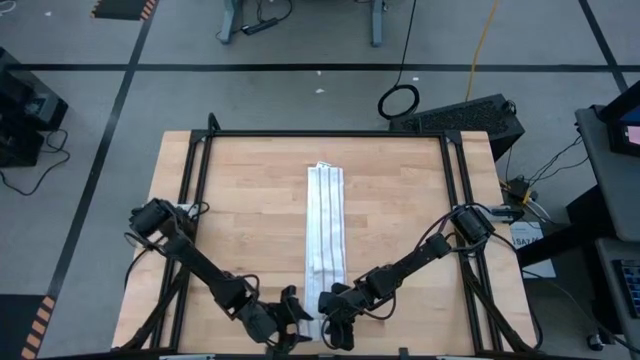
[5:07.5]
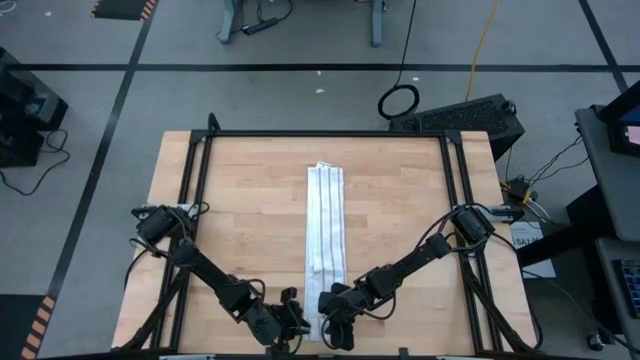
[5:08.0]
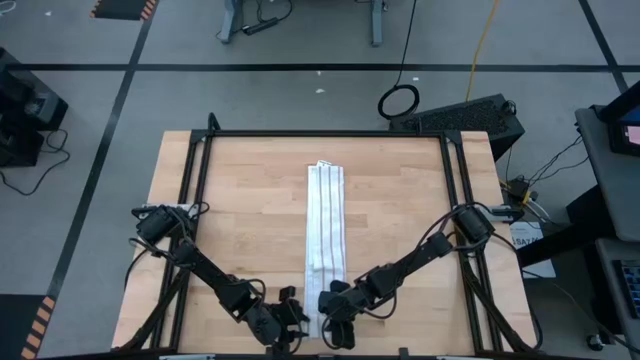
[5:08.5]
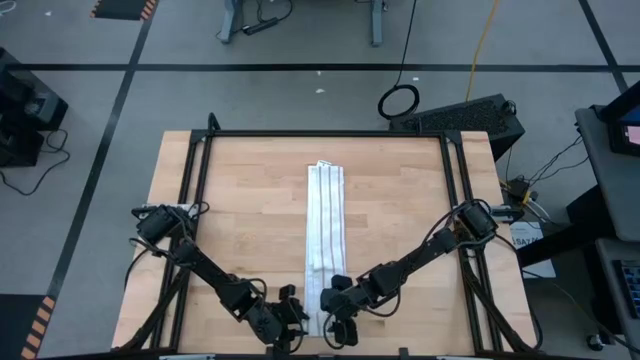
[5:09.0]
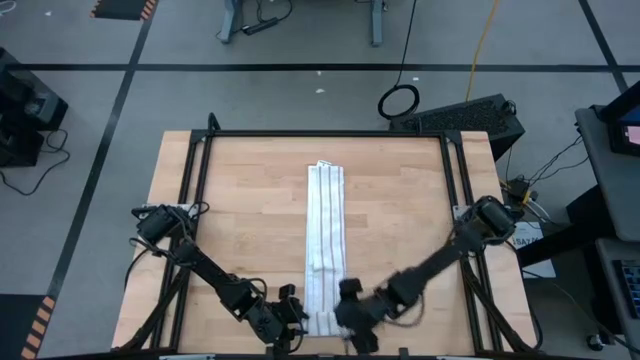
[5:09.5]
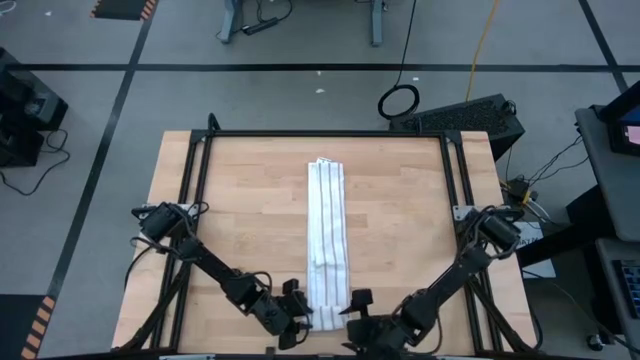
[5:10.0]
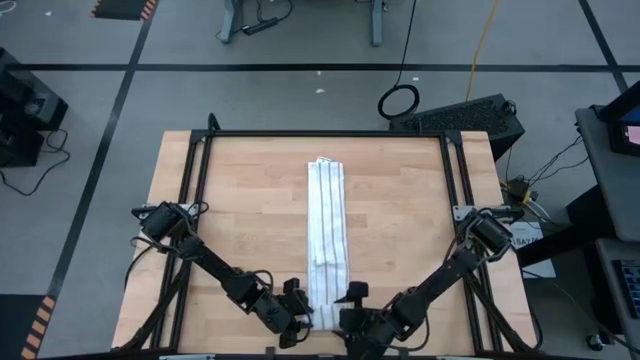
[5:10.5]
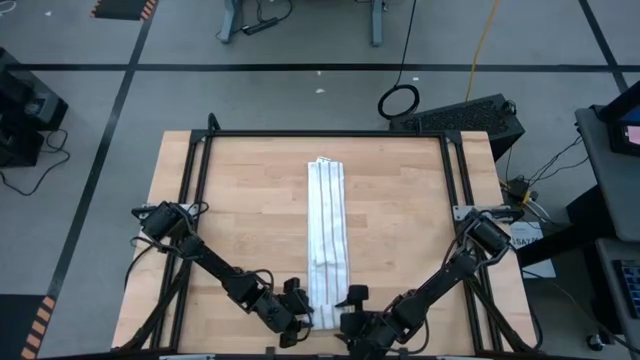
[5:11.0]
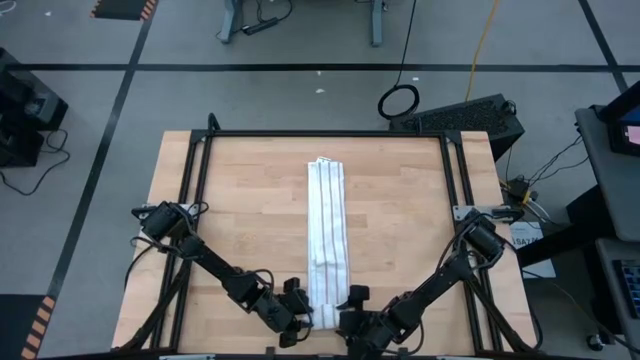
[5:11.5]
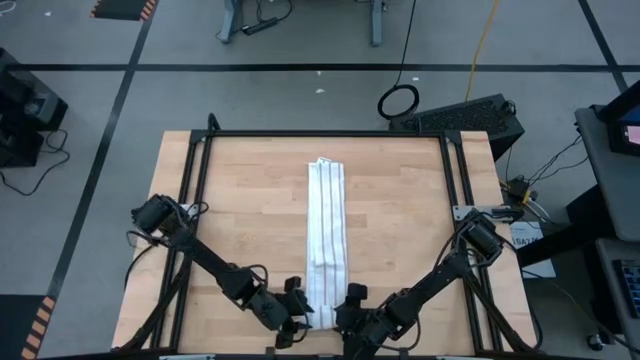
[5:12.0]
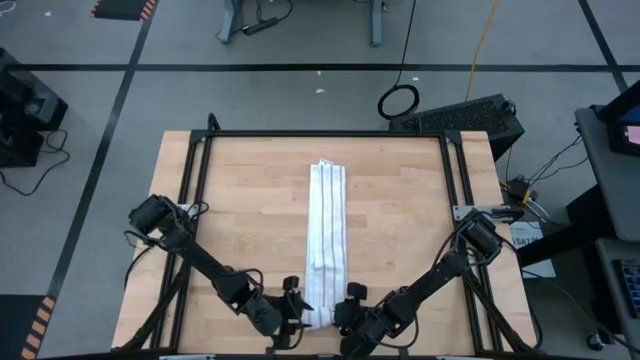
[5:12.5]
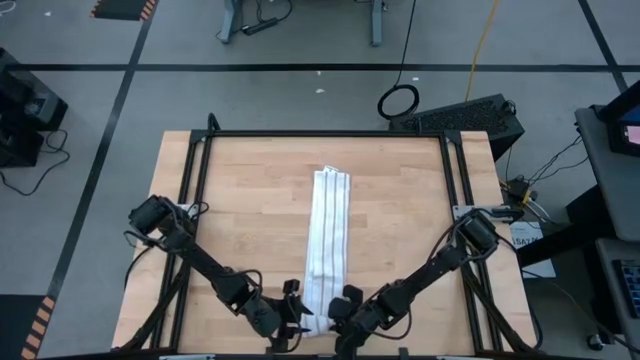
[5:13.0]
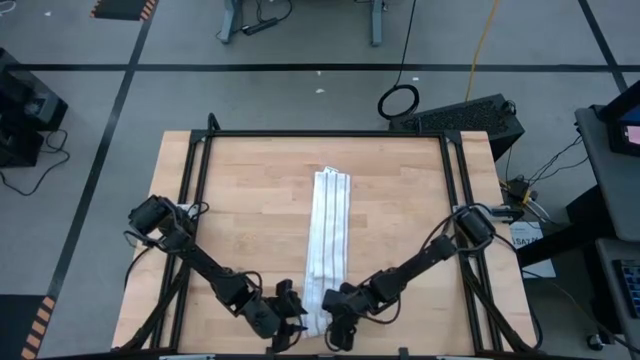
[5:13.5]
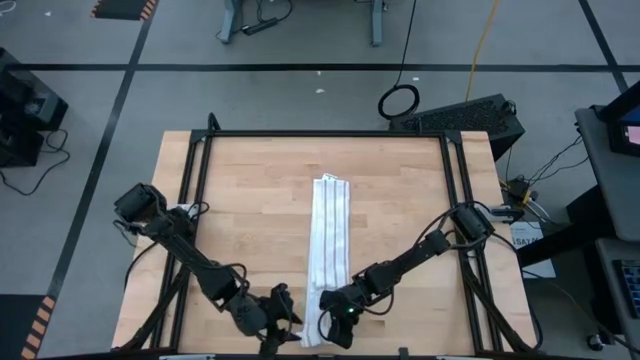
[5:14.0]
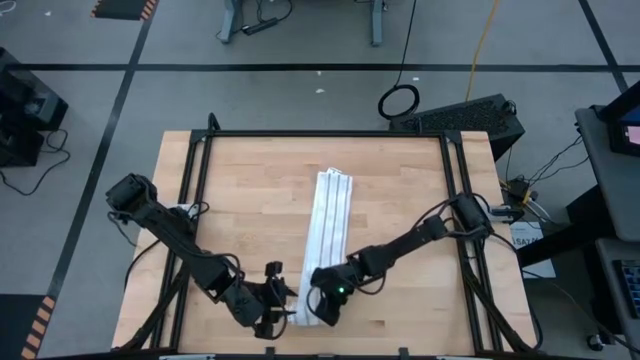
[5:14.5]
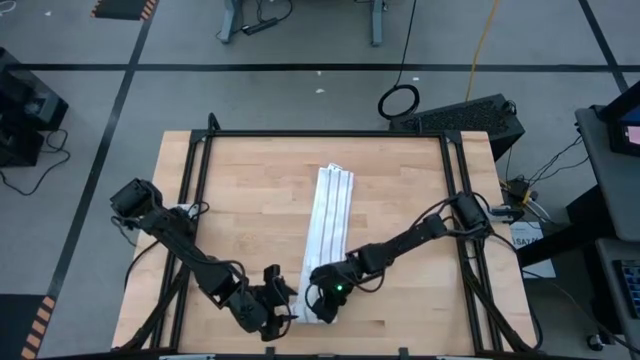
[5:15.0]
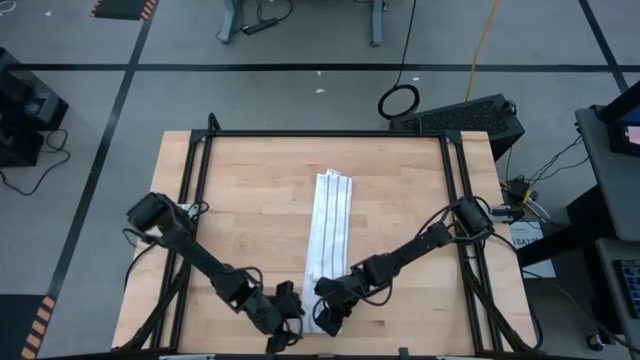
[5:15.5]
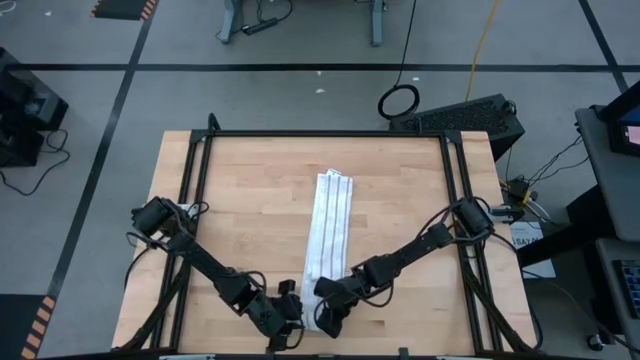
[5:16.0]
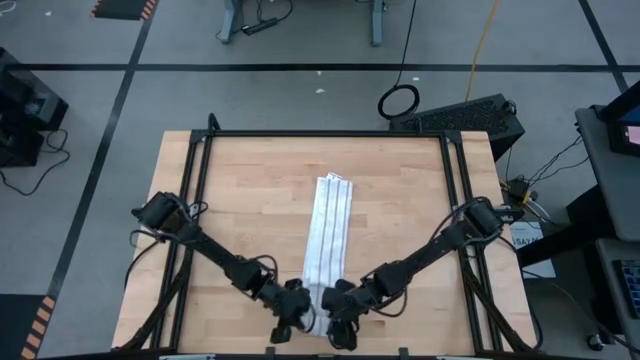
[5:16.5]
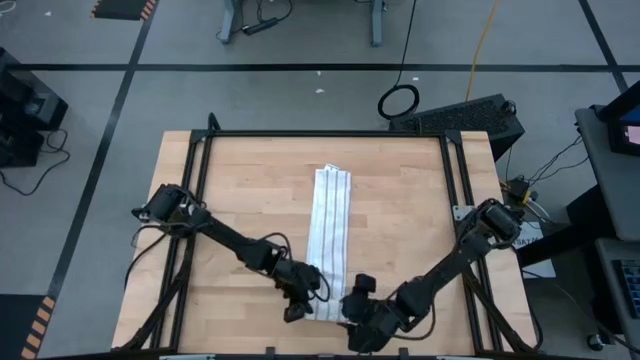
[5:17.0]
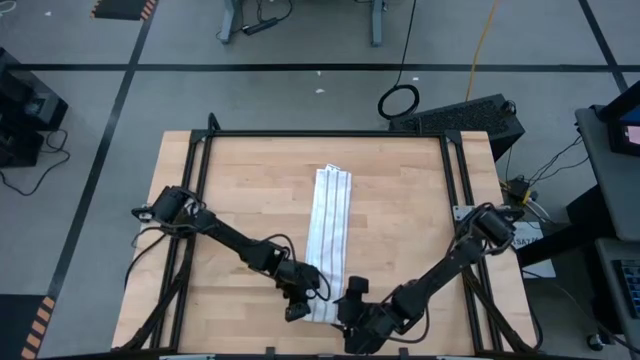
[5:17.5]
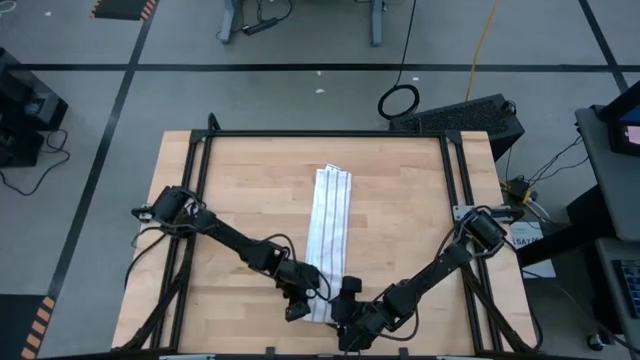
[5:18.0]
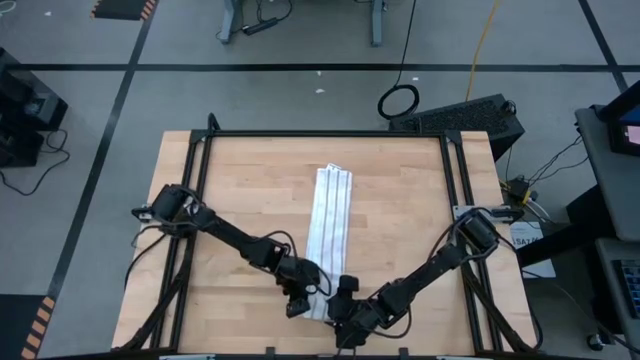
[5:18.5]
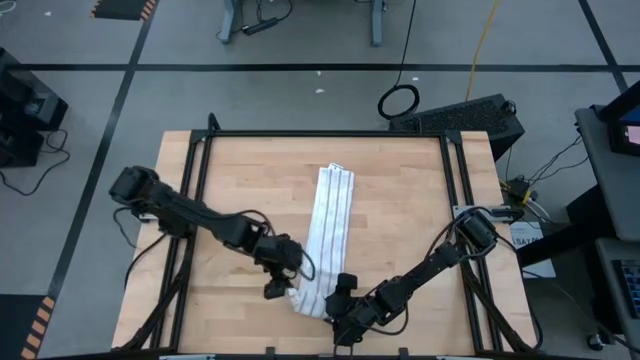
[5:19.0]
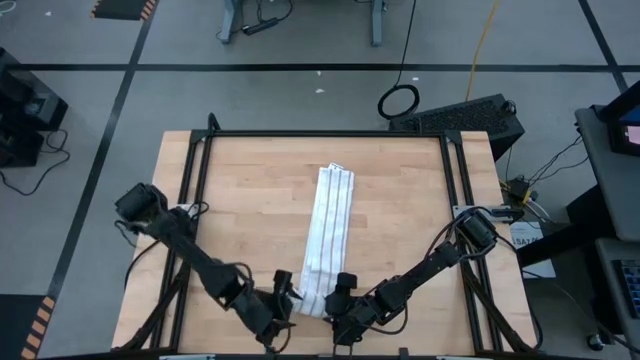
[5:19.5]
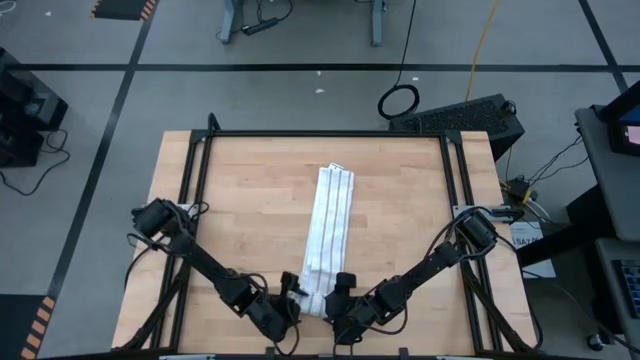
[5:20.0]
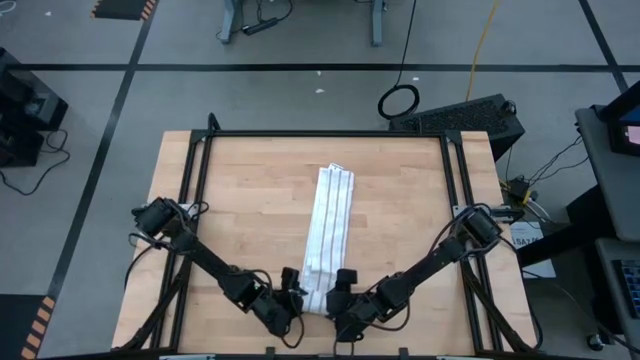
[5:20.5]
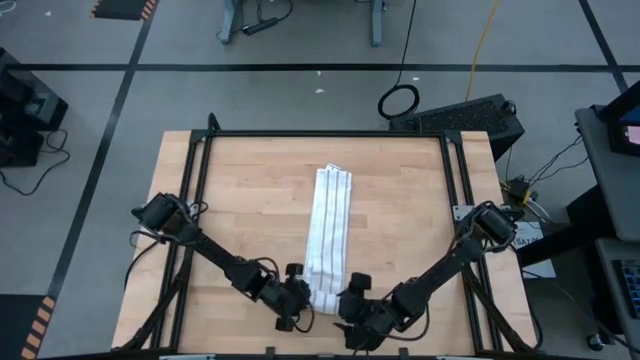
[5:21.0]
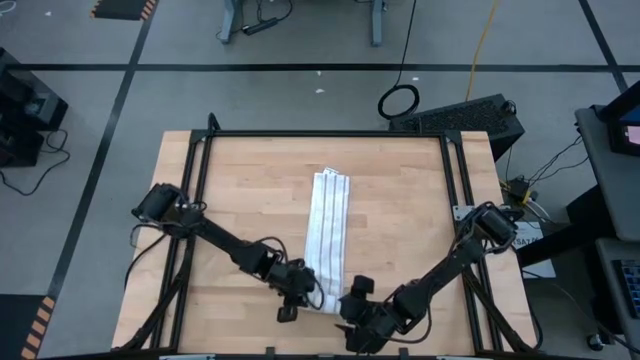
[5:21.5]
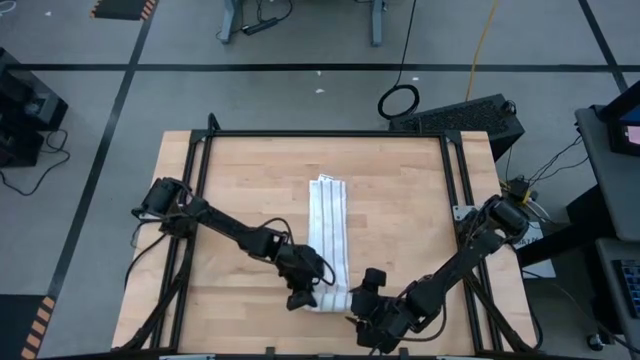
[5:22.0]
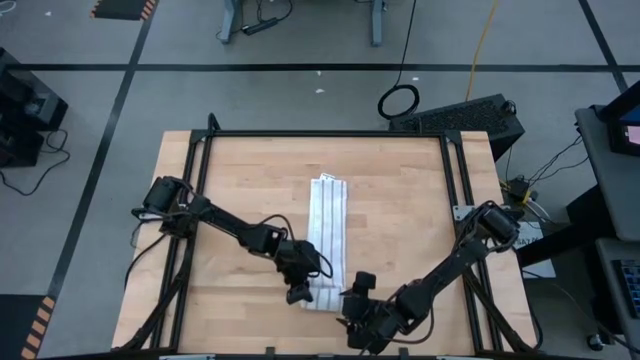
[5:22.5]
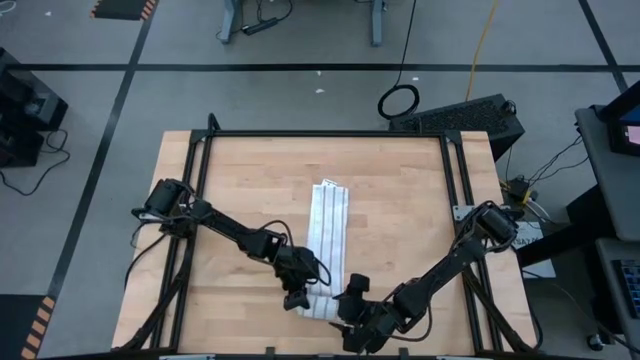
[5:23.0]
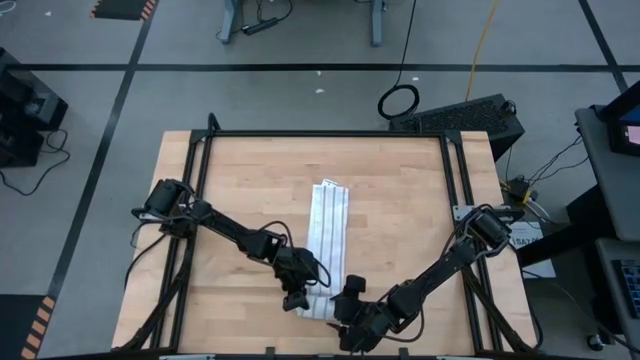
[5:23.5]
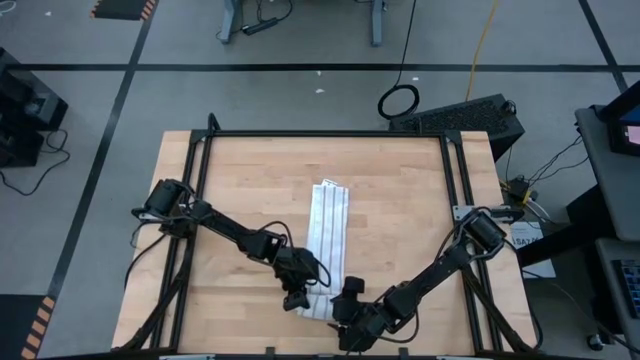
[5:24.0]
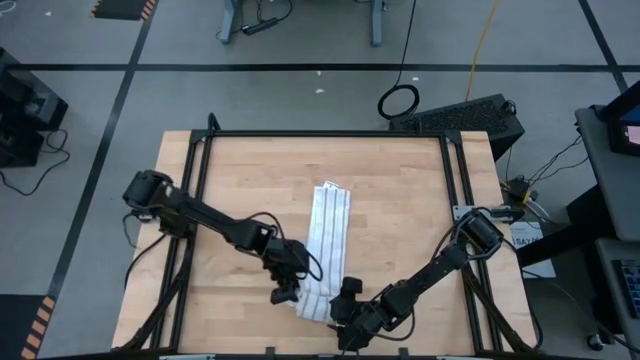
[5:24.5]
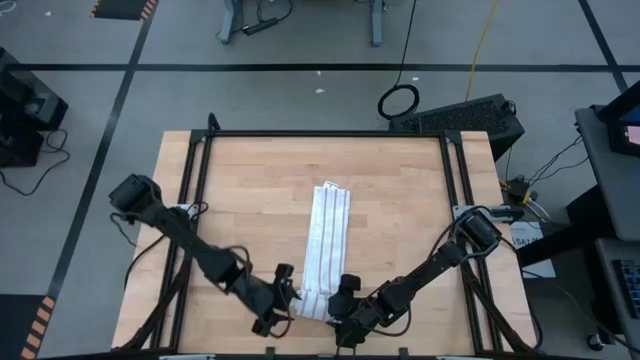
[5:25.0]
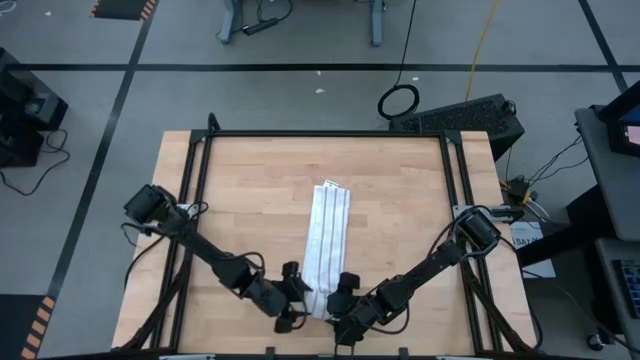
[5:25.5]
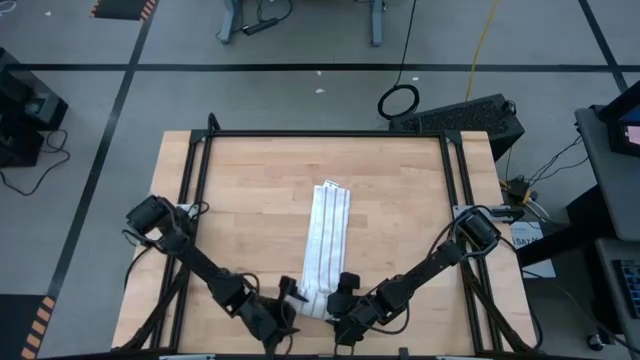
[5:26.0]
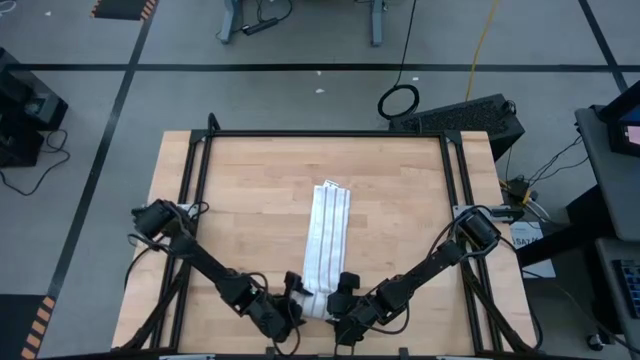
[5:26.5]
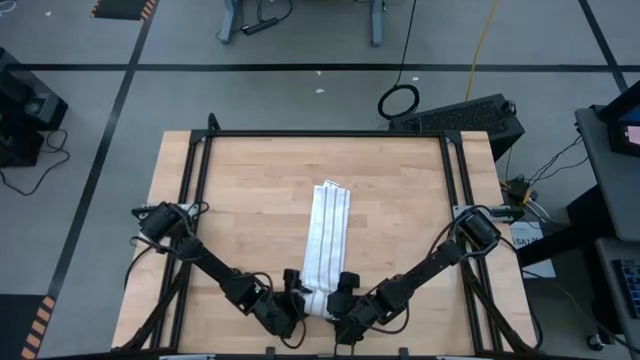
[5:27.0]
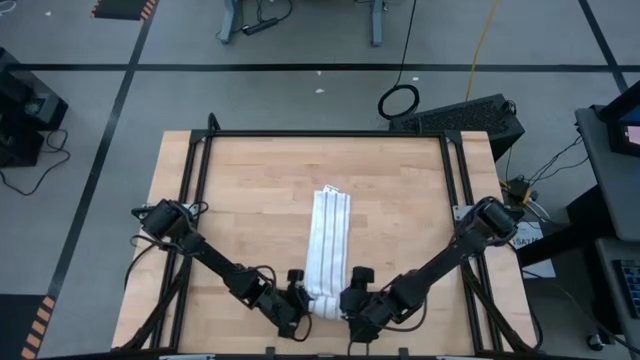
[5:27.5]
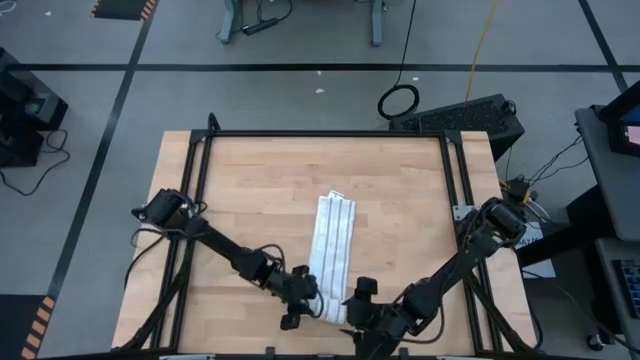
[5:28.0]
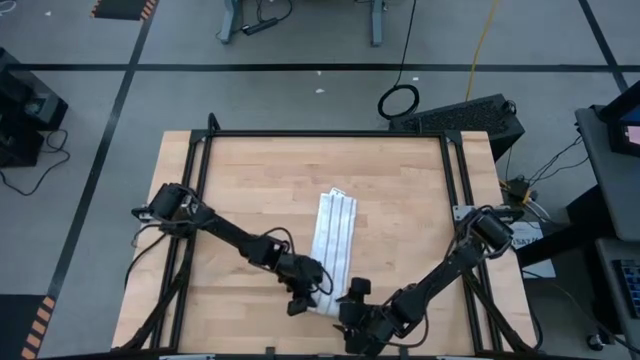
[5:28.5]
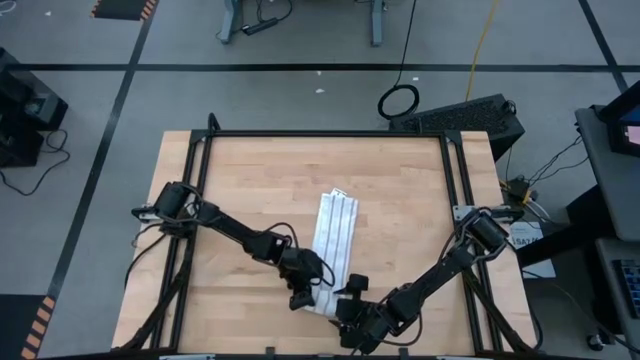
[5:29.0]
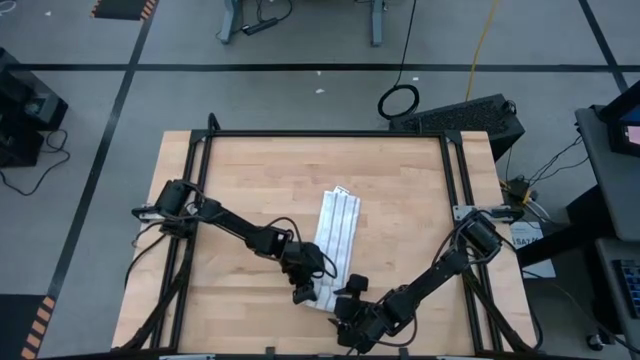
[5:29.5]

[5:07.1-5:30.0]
Task: Roll towel into tight, uniform cylinder
Roll the white brown kitchen towel
